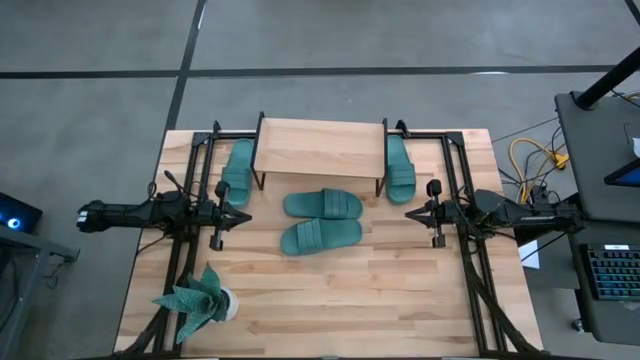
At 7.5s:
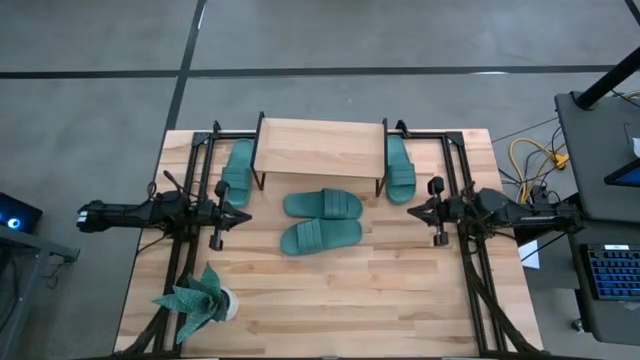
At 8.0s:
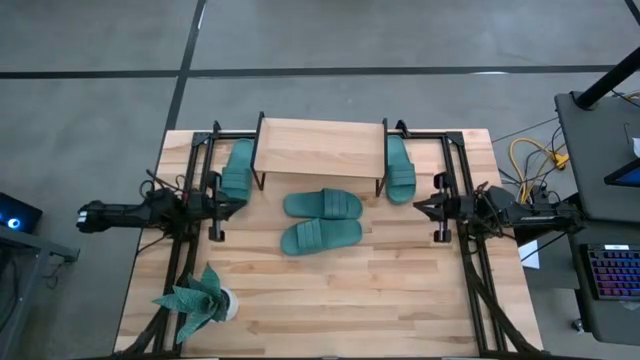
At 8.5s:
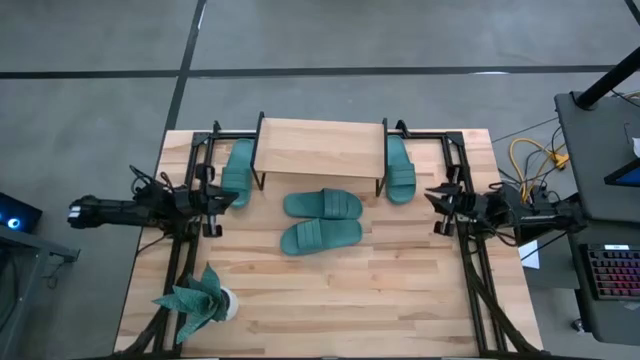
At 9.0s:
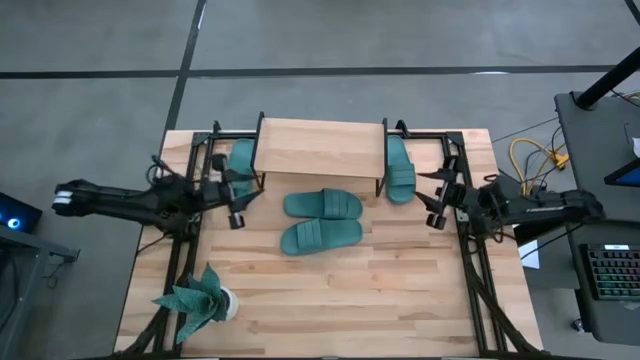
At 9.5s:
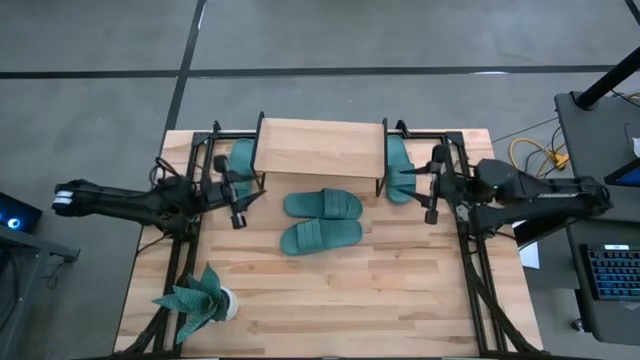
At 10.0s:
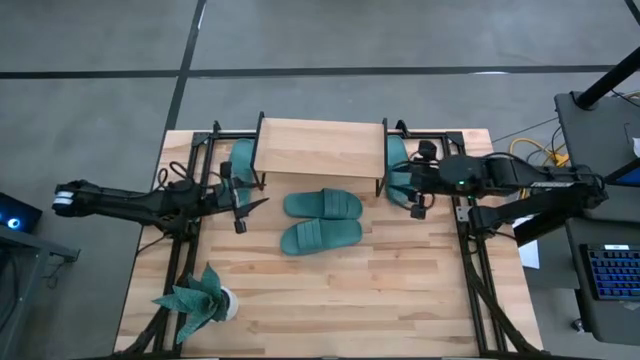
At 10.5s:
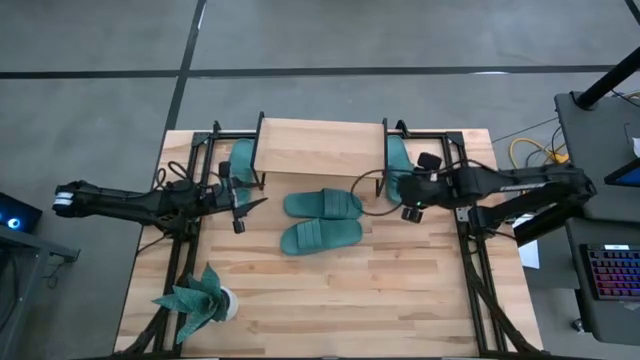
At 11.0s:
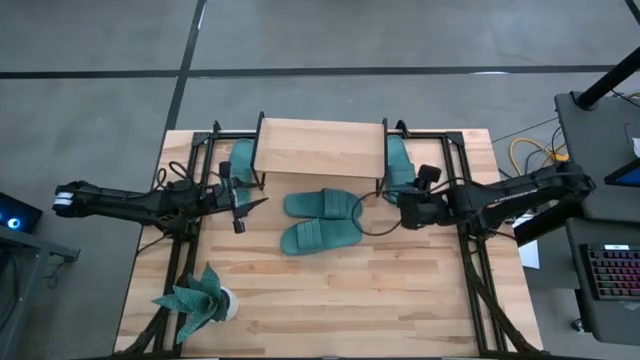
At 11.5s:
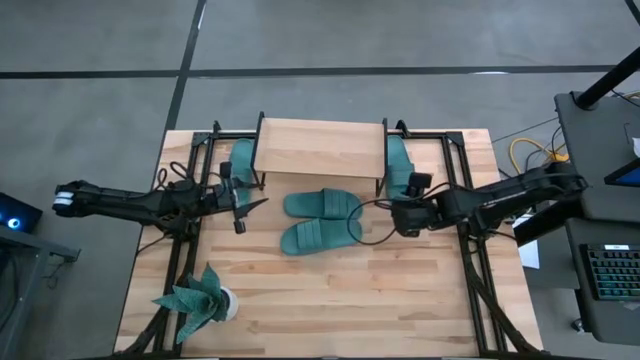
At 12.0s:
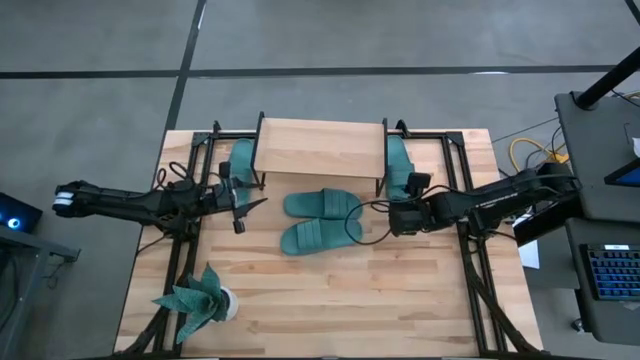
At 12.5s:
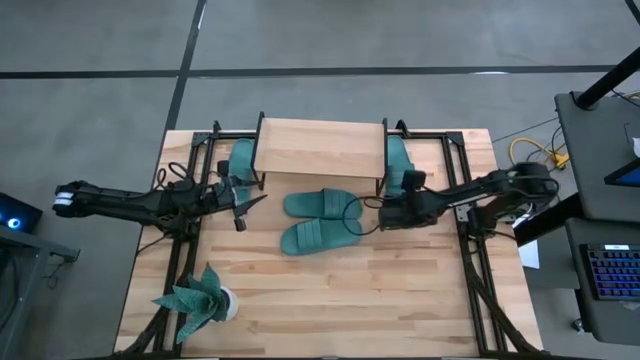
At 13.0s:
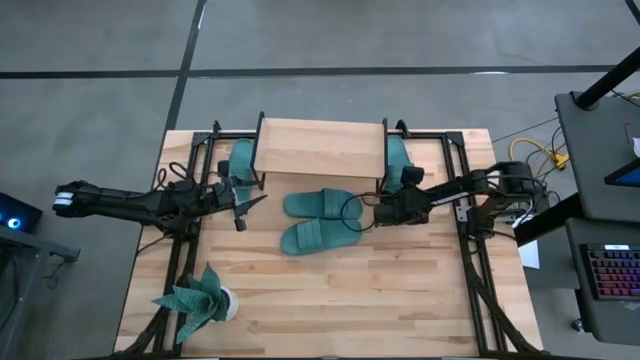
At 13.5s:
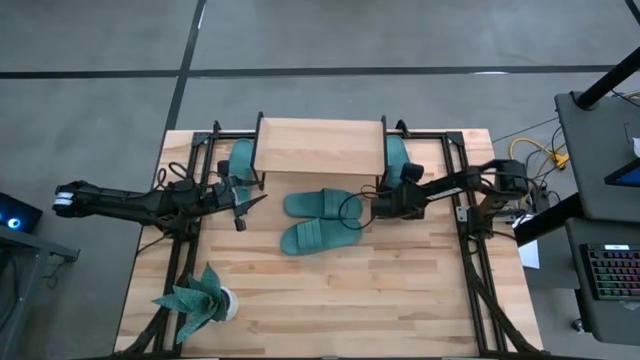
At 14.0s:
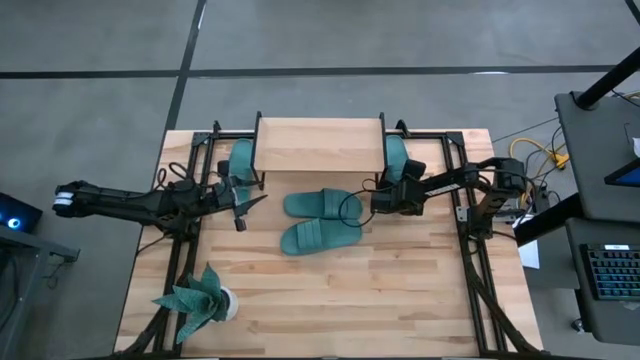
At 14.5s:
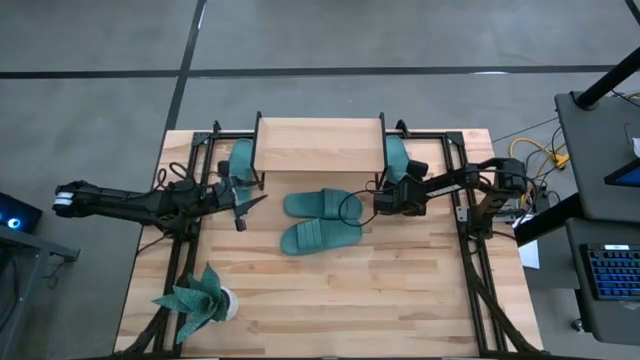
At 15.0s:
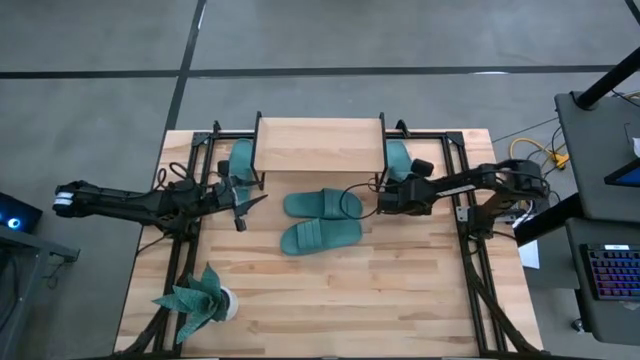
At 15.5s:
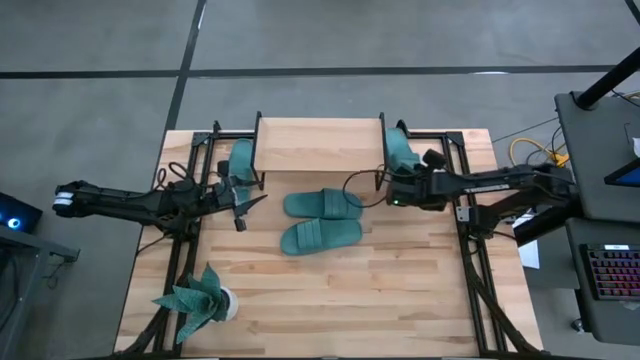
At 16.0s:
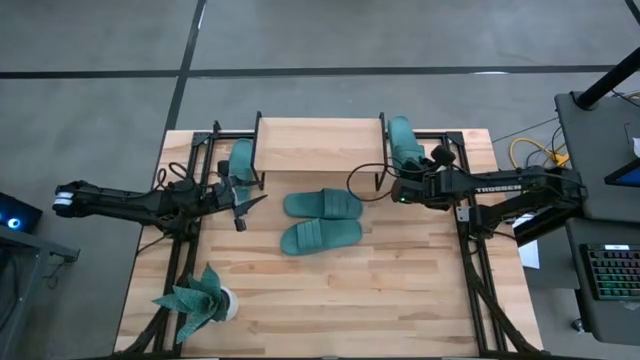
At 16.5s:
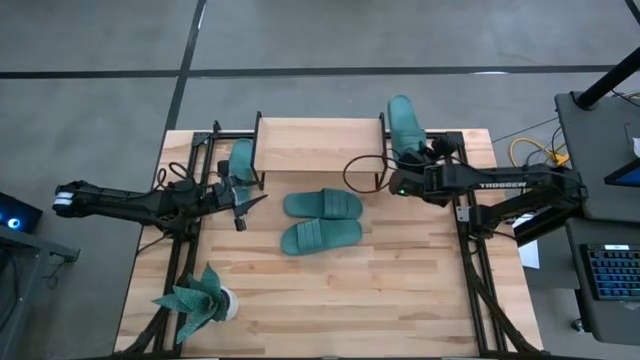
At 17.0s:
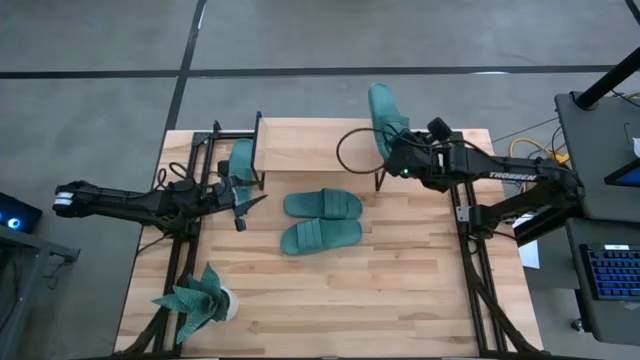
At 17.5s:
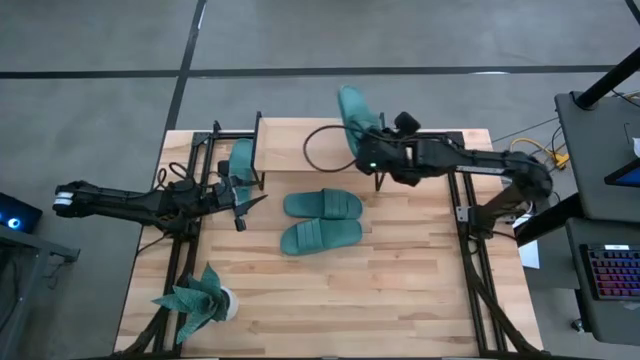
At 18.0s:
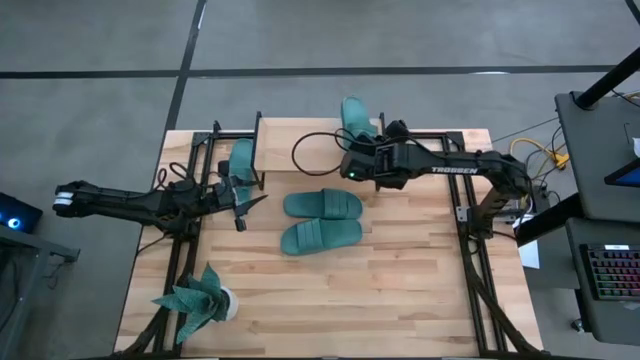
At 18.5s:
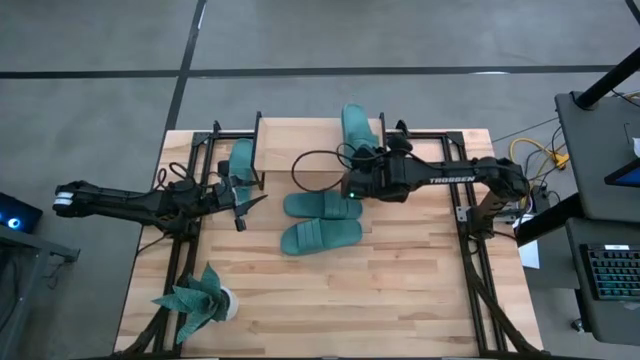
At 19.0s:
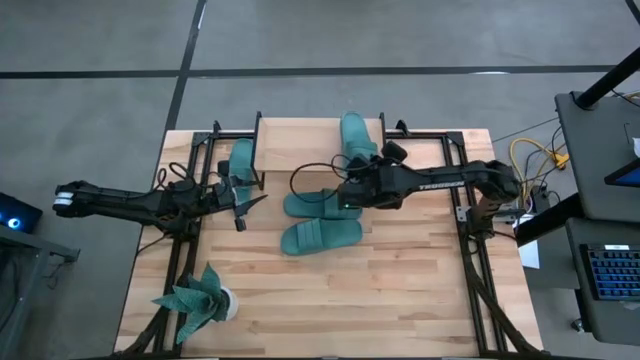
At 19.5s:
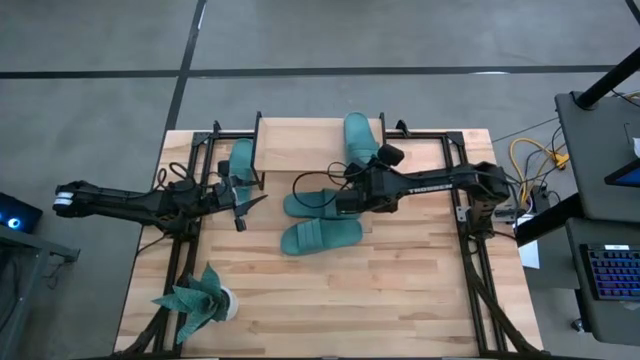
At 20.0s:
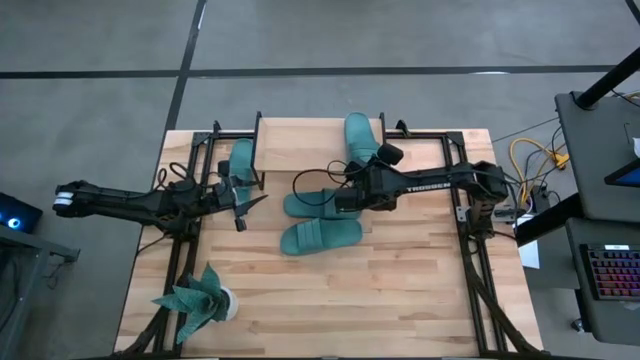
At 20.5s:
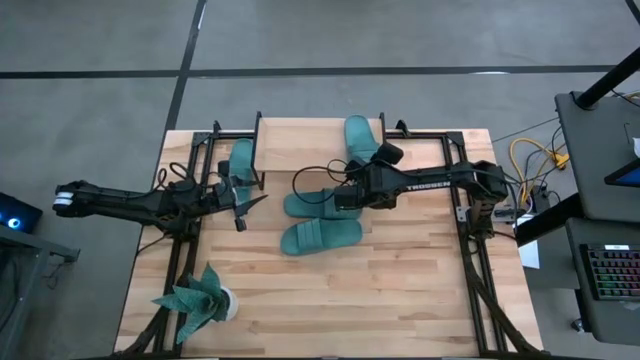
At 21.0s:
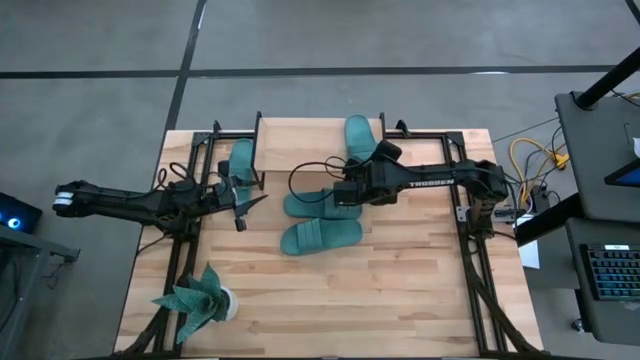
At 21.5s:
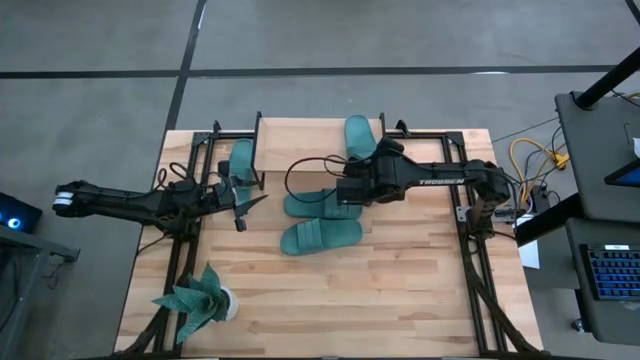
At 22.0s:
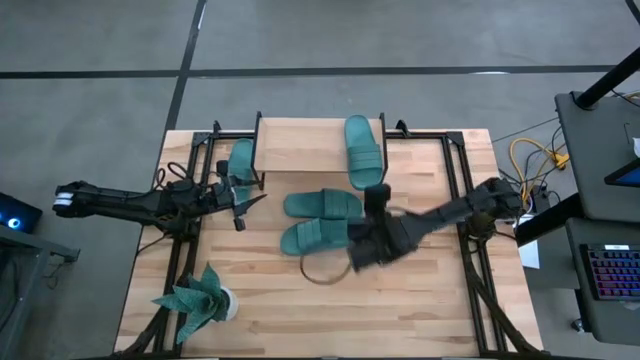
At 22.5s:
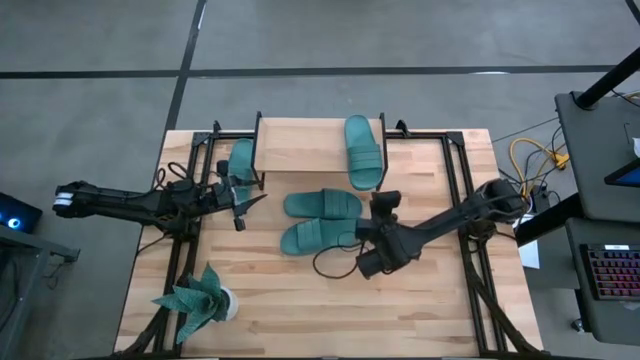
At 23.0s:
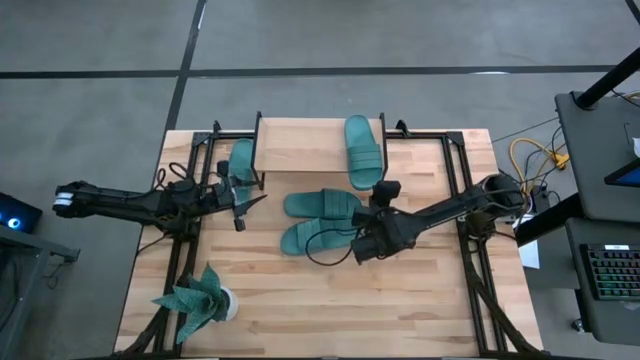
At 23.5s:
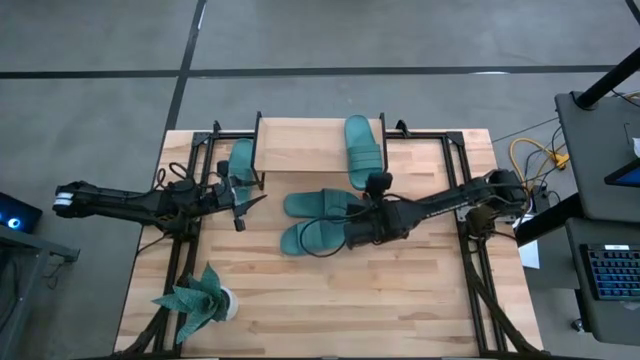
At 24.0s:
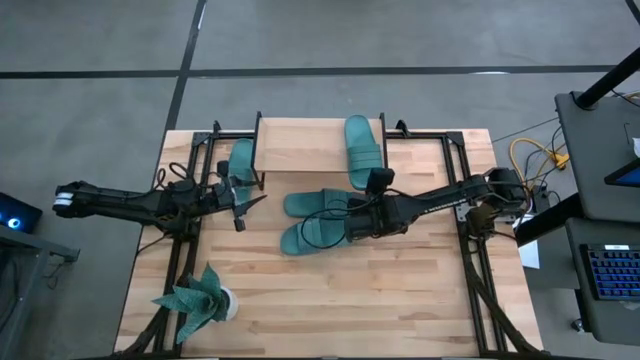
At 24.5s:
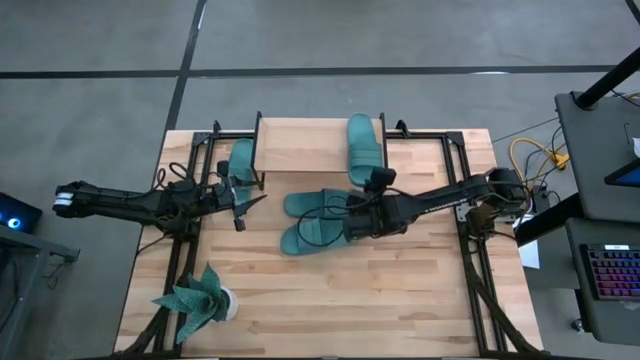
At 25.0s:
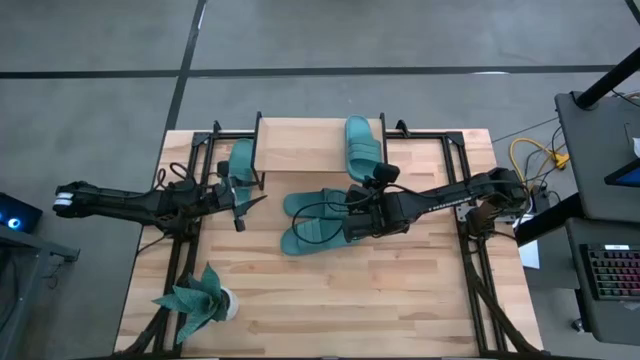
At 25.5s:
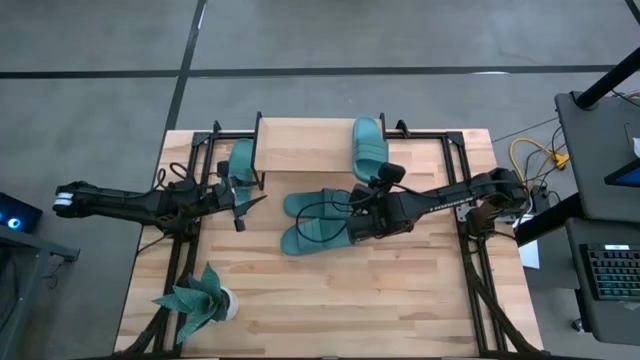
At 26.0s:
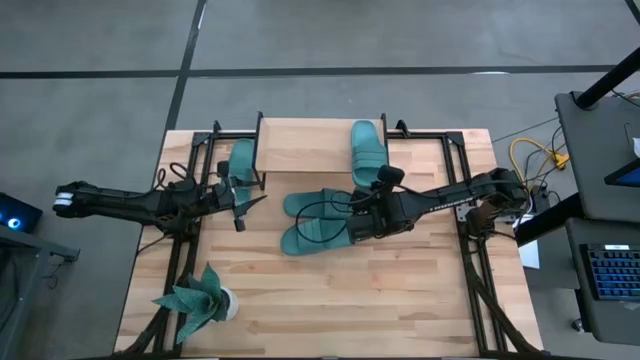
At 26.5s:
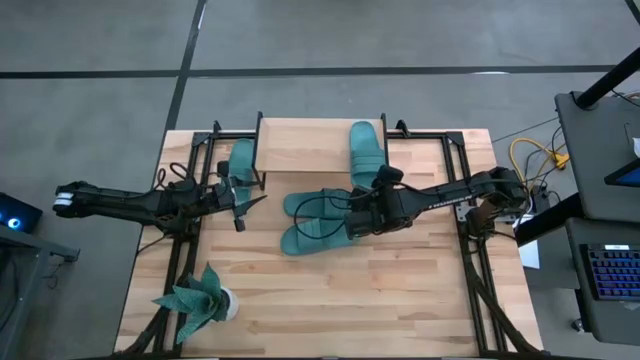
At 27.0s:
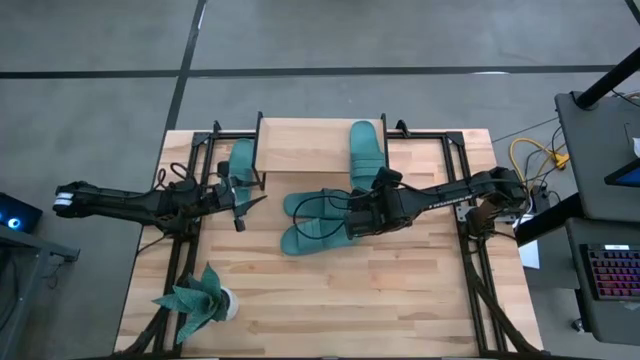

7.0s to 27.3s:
Task: Pick and place slides into the shelf
Put the top right green slide on the shelf
